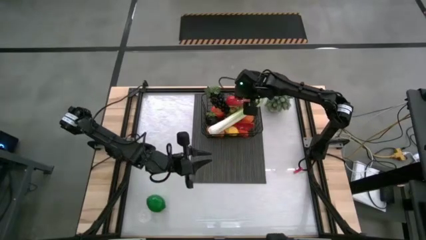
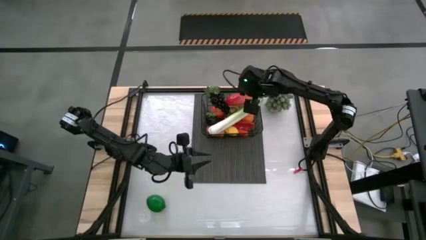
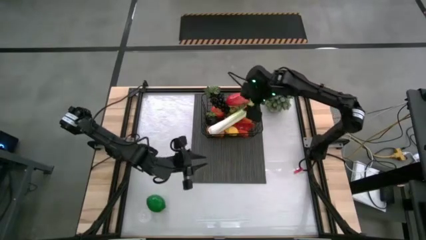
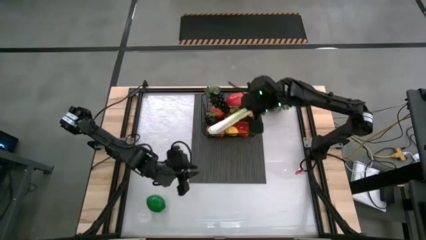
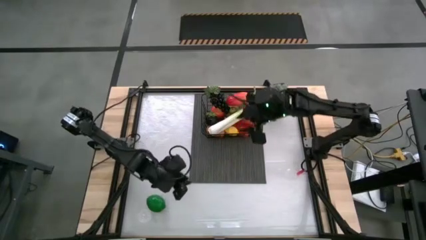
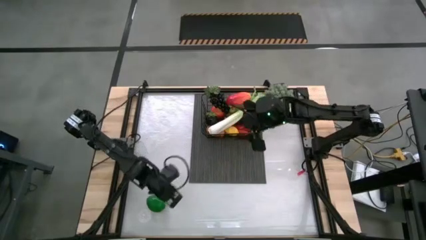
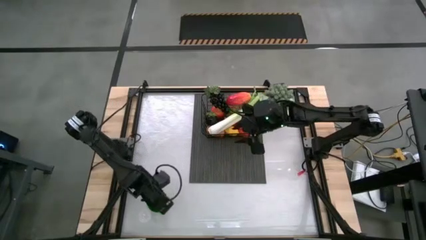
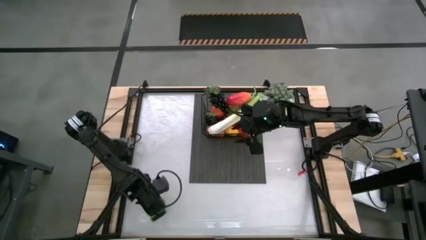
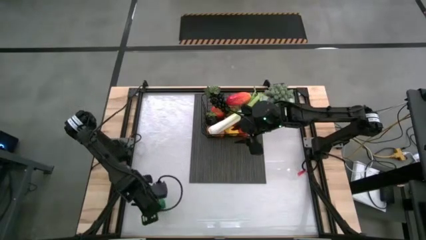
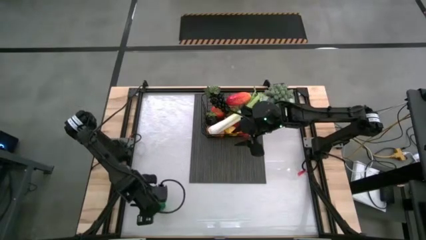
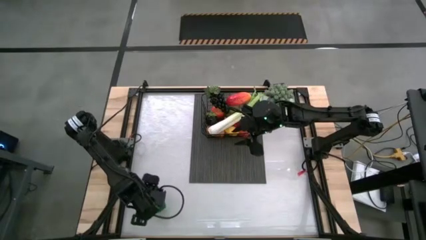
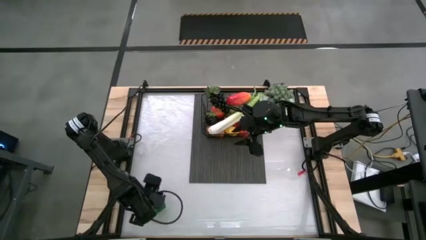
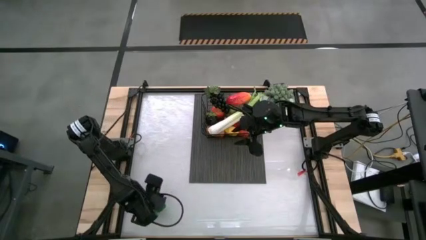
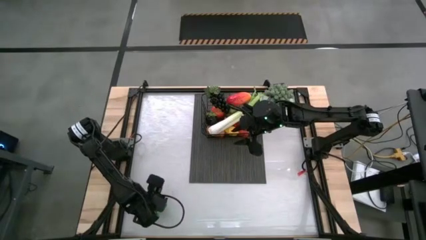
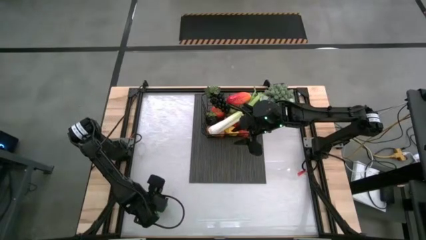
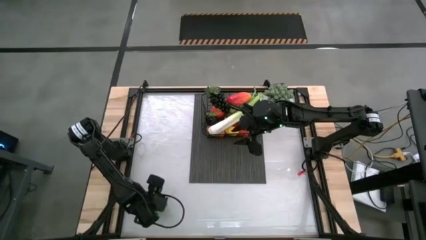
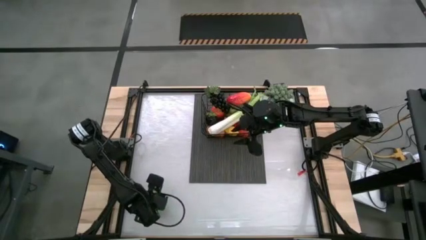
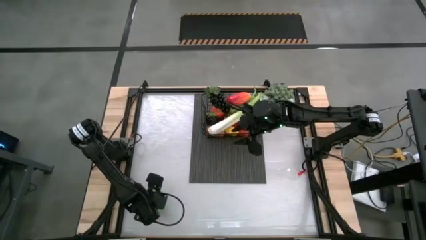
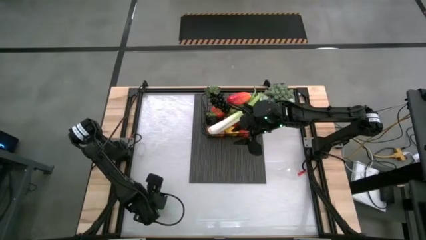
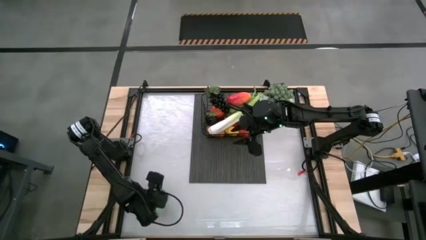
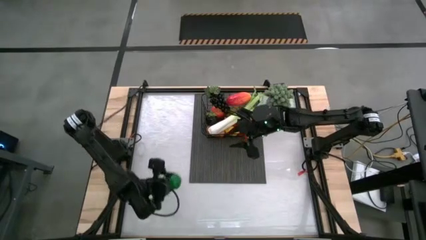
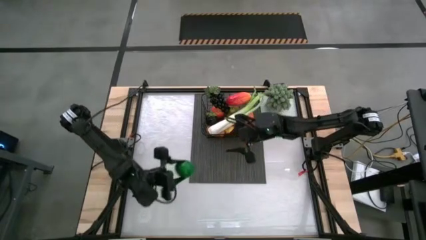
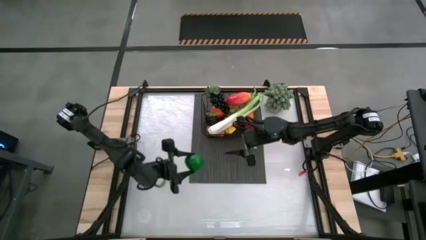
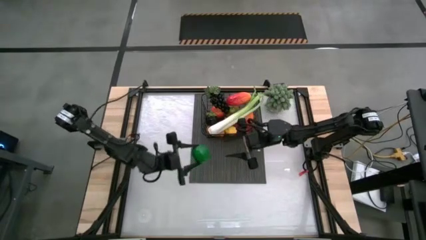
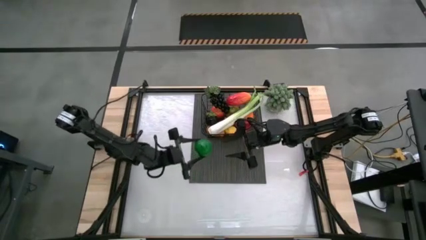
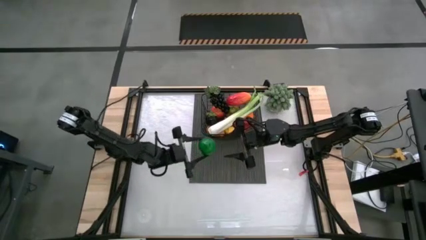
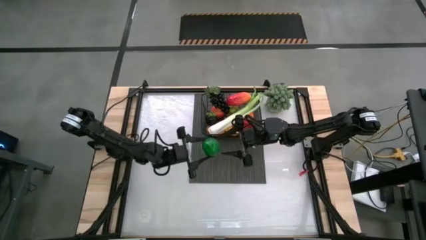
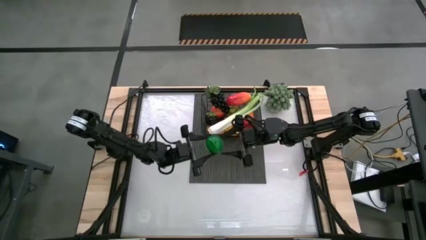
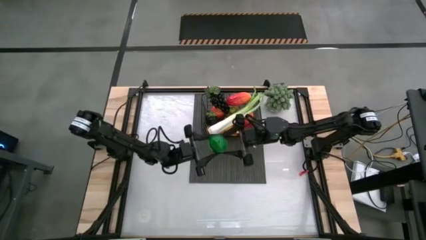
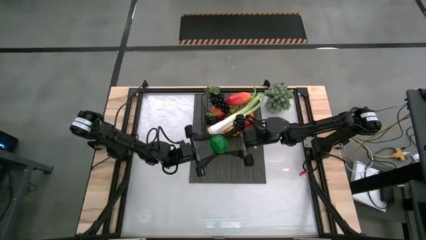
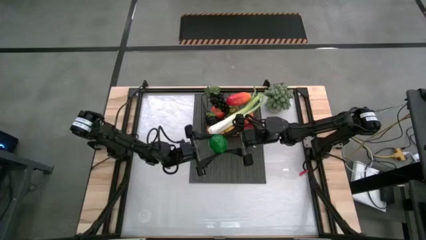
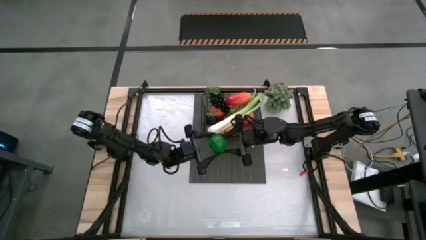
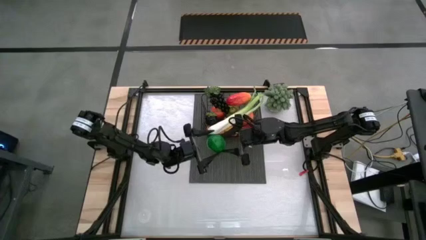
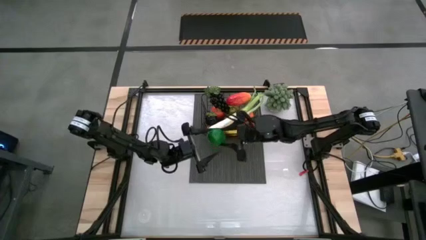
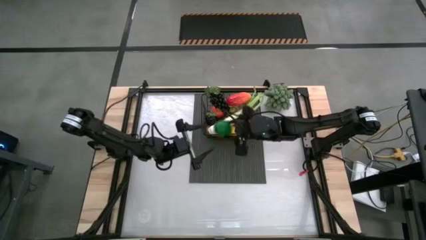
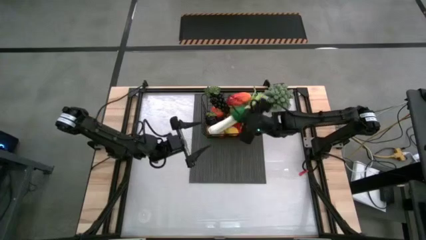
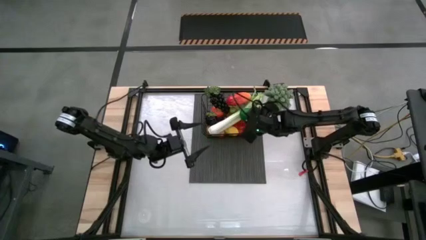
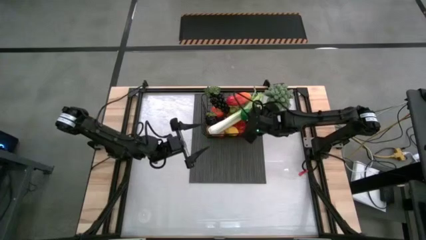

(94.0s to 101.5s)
Task: Build produce basket
Put the lime into the wire basket

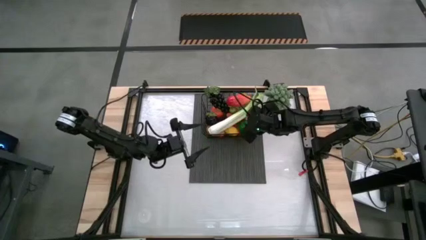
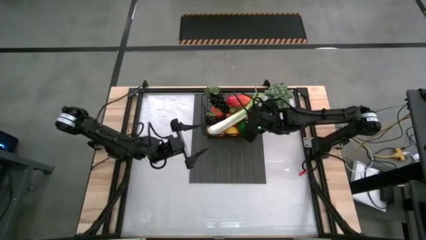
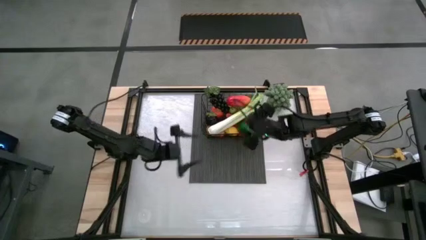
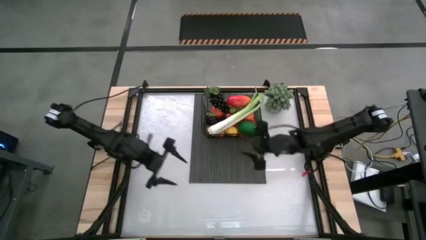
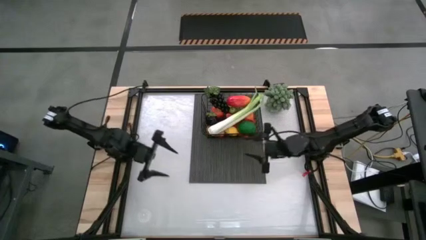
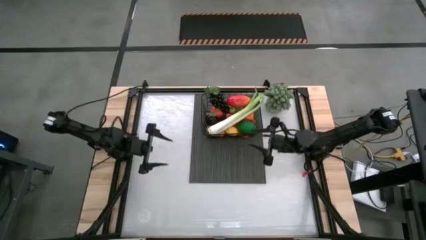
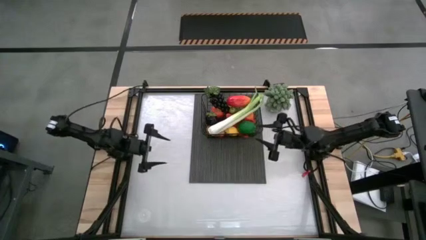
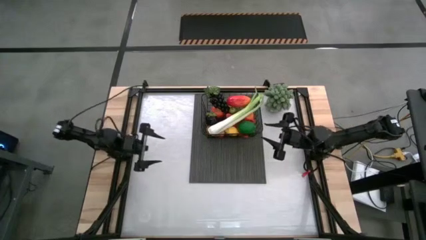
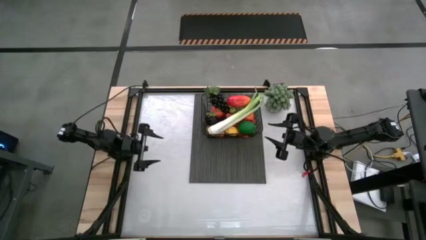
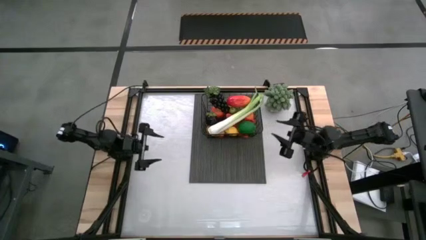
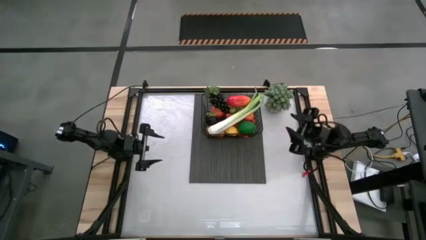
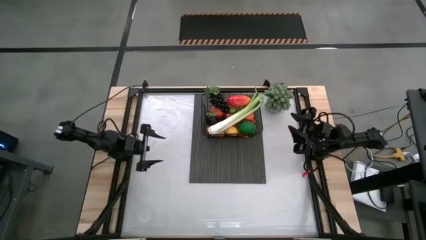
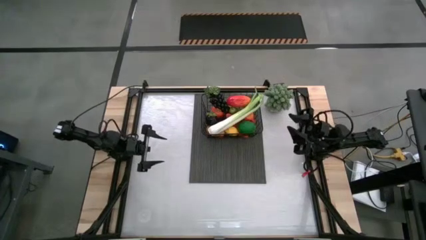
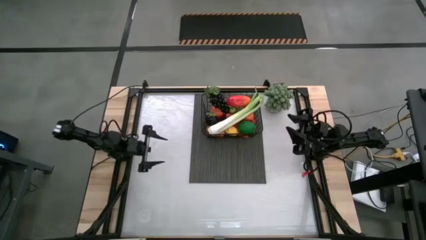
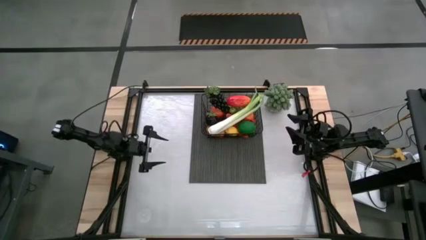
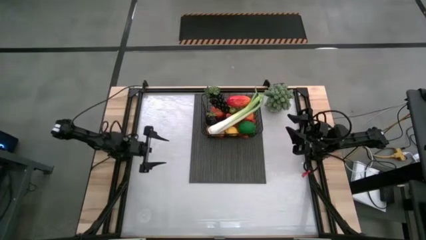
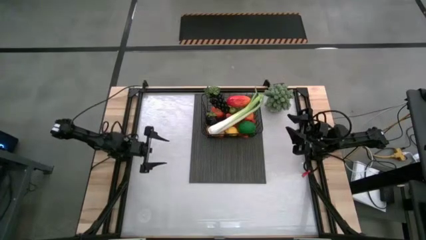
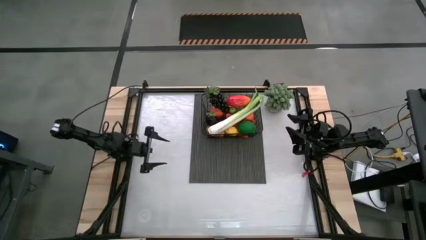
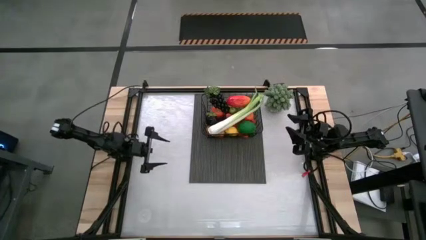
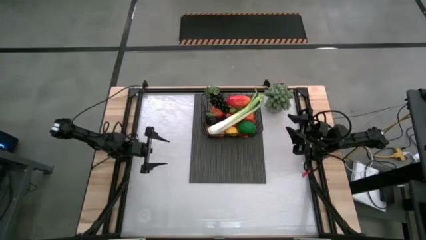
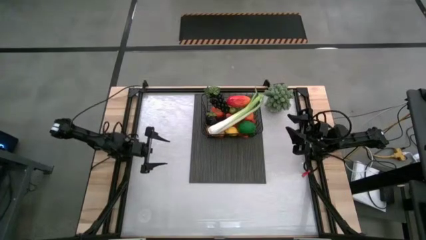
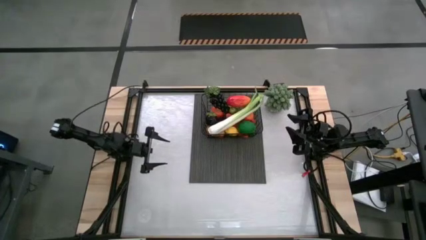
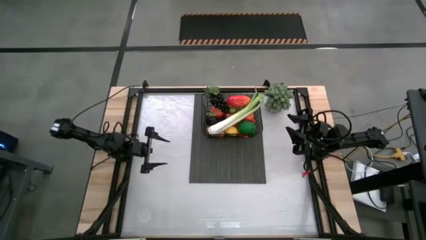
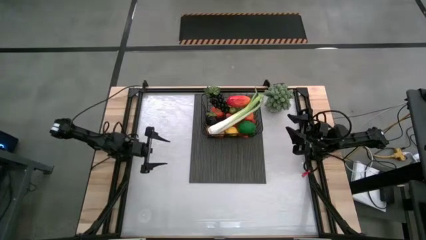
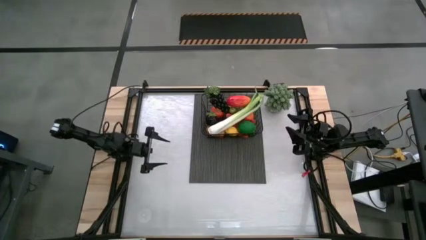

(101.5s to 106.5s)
Return to Home Position

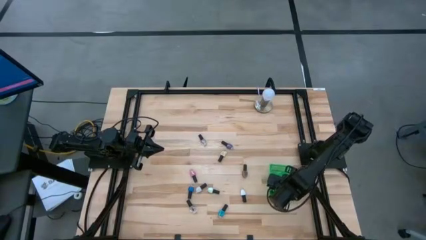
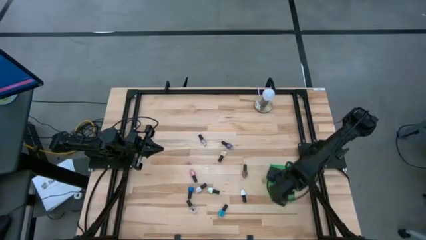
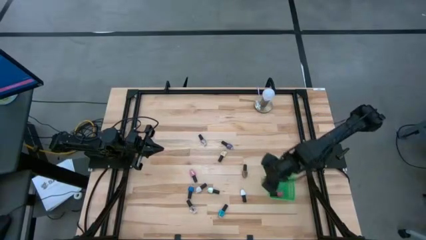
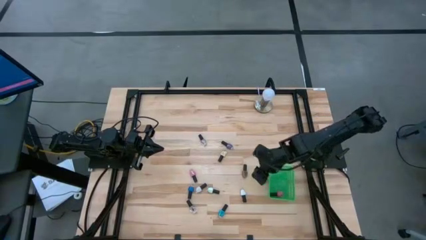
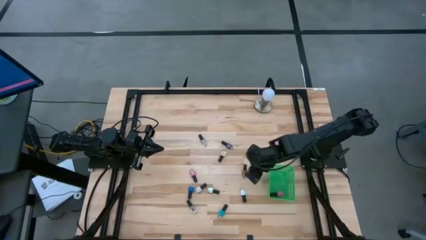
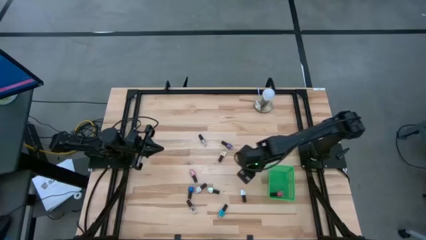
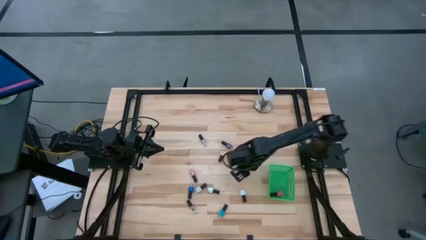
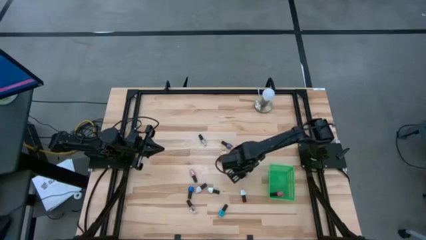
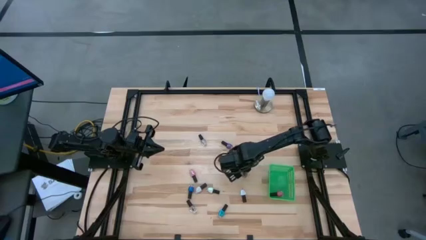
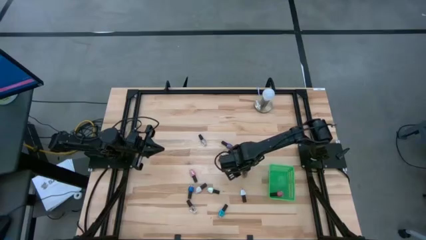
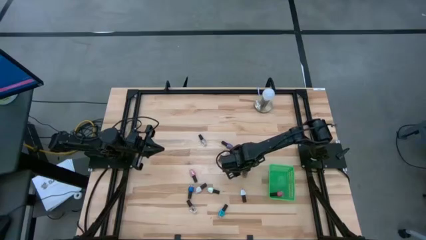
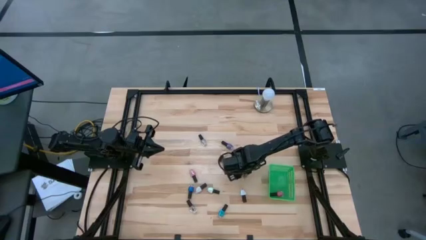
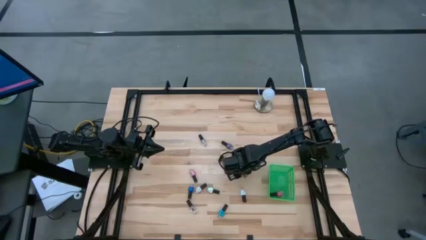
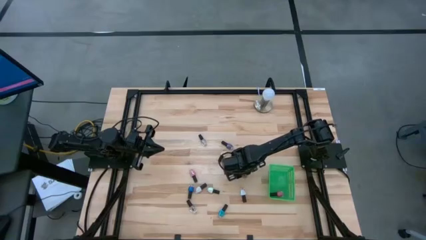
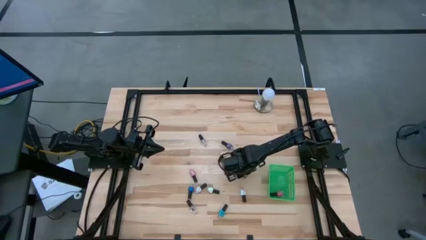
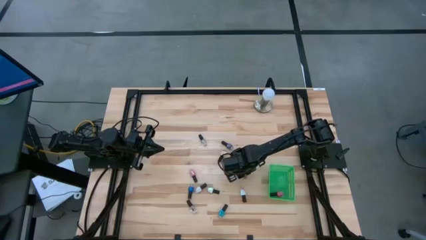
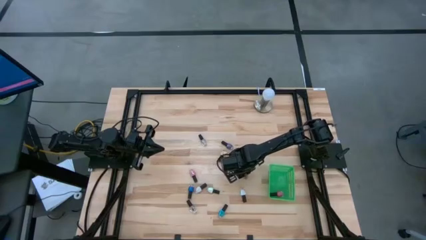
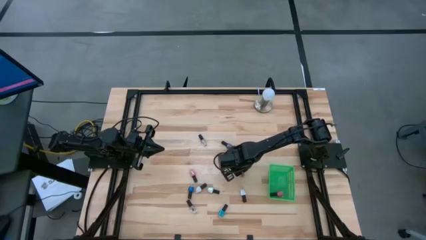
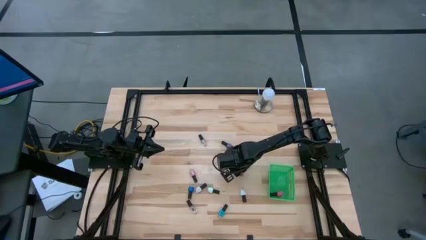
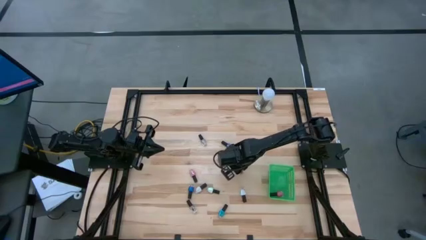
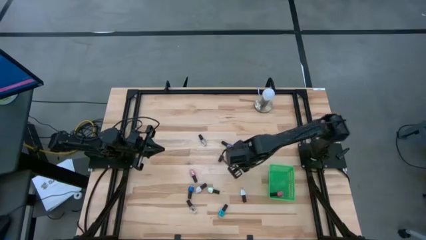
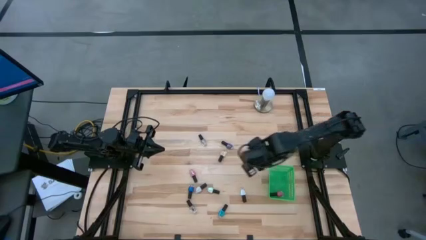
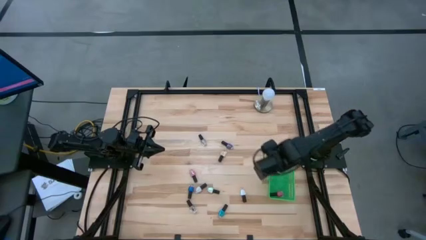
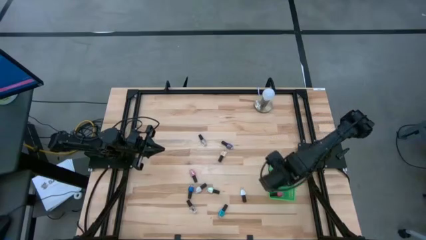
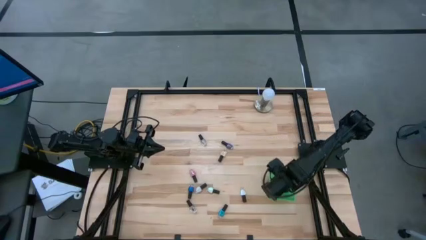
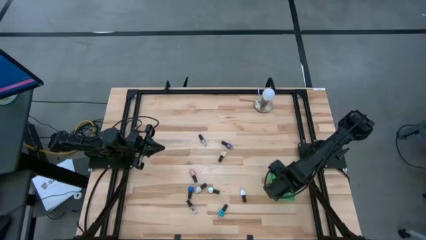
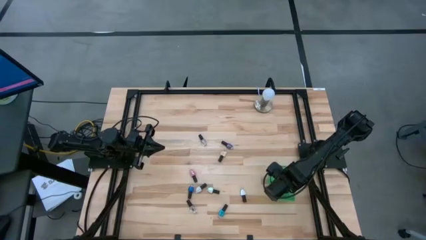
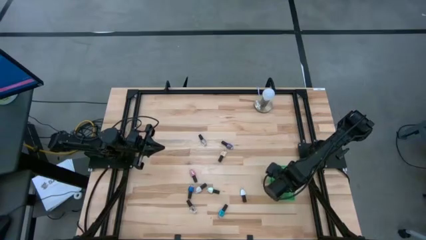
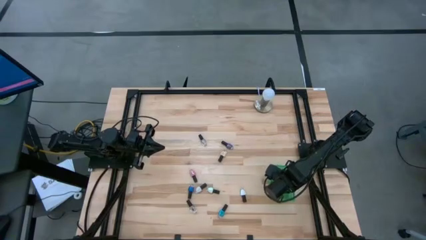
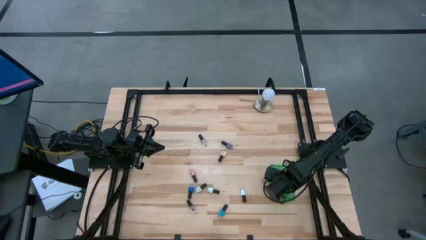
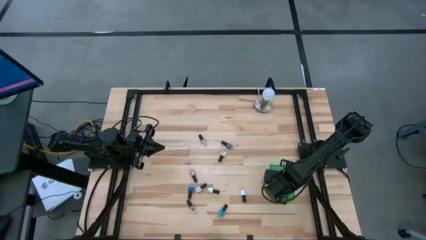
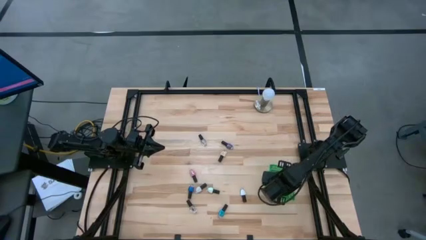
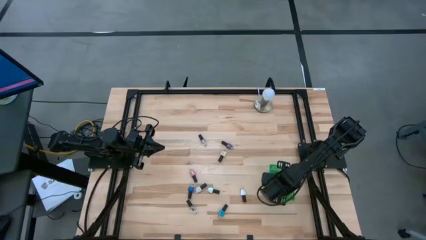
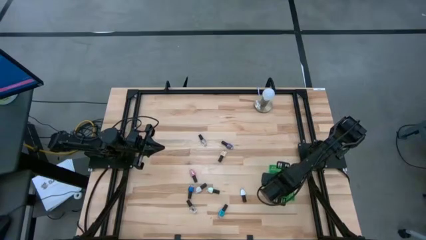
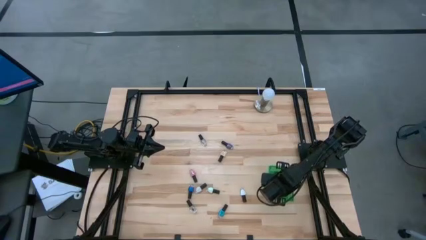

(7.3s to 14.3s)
Task: Pick & Place Nail Polish
Put the brown nail polish into the green bin
